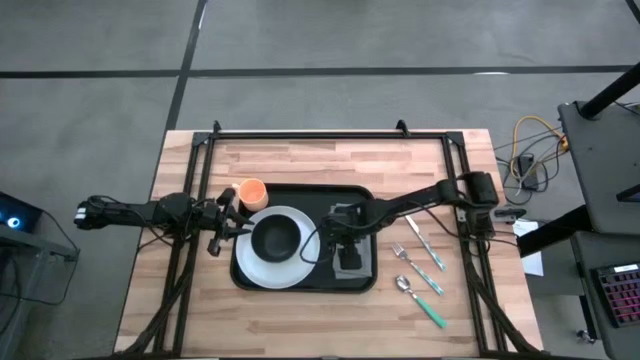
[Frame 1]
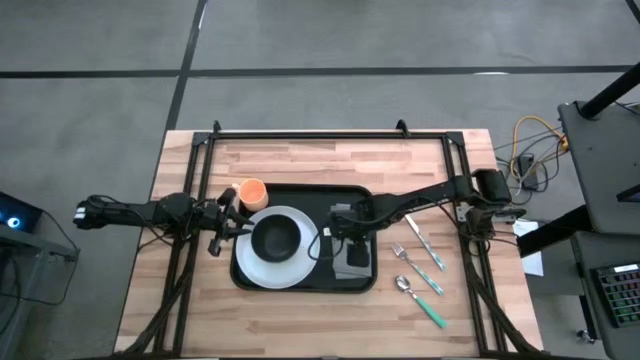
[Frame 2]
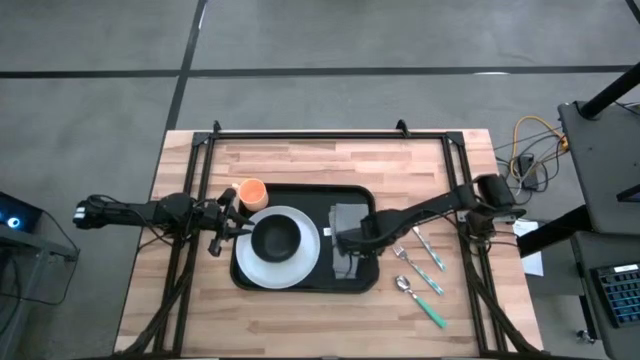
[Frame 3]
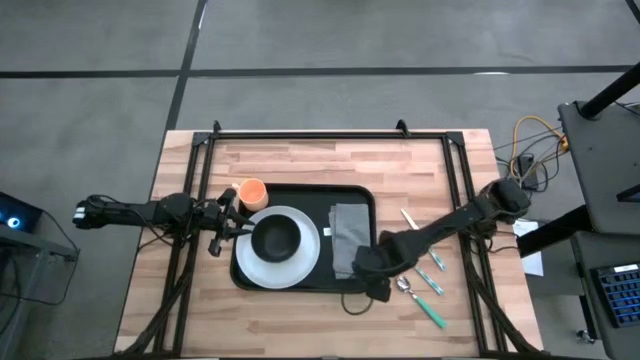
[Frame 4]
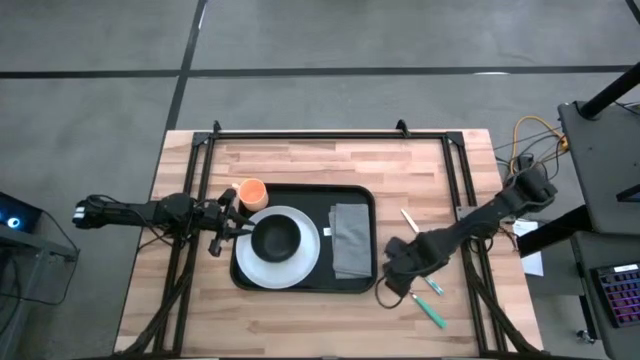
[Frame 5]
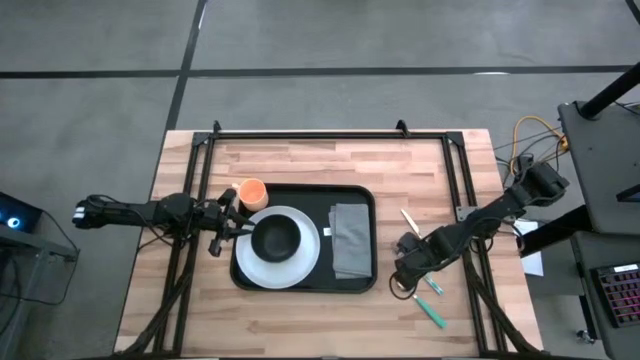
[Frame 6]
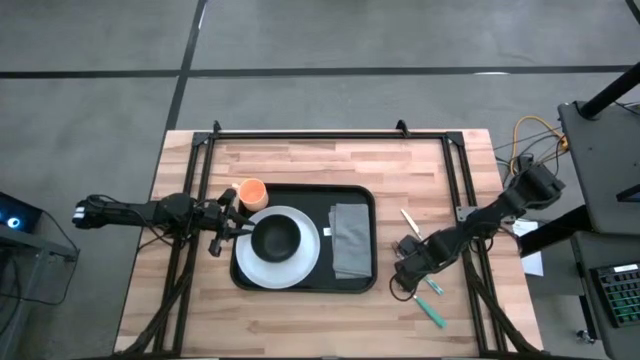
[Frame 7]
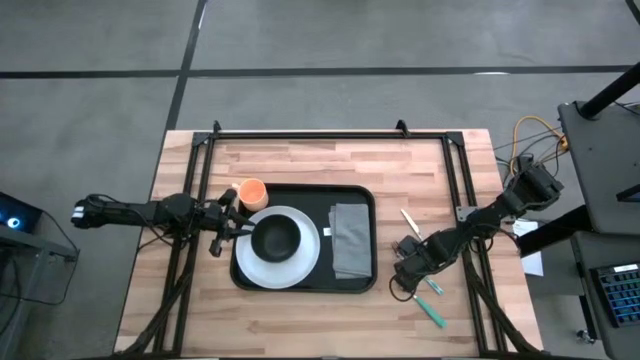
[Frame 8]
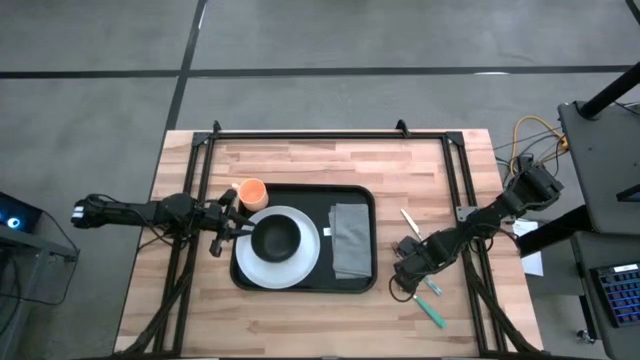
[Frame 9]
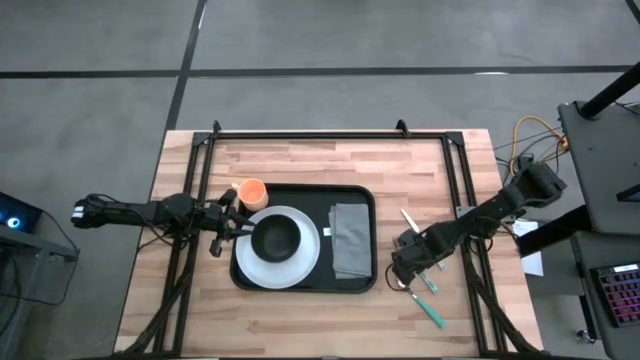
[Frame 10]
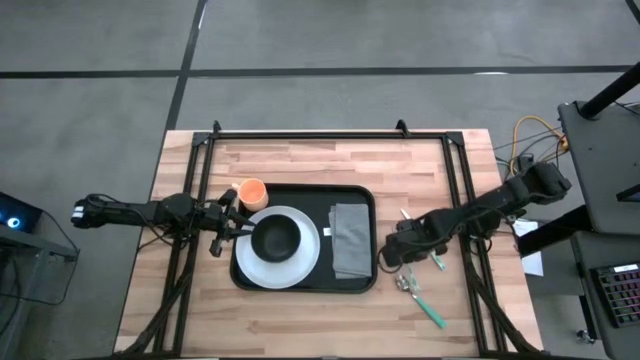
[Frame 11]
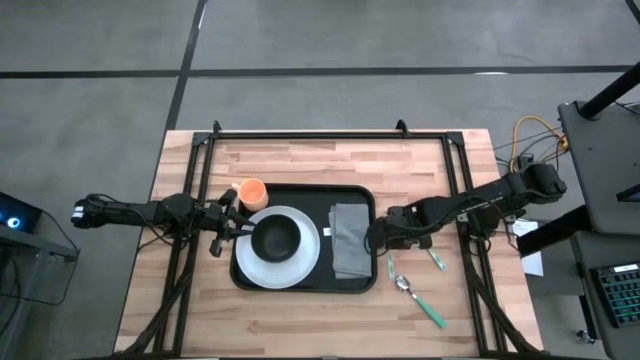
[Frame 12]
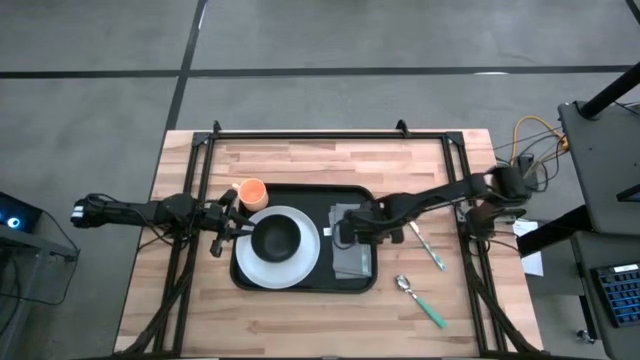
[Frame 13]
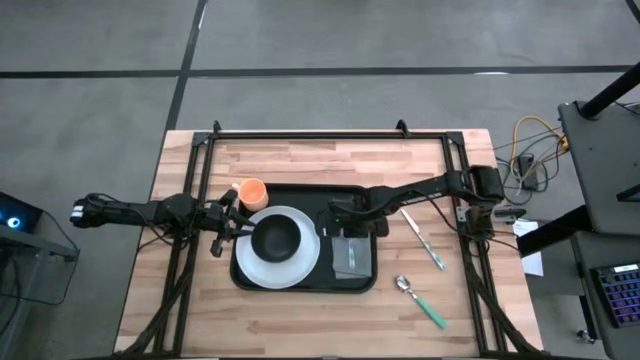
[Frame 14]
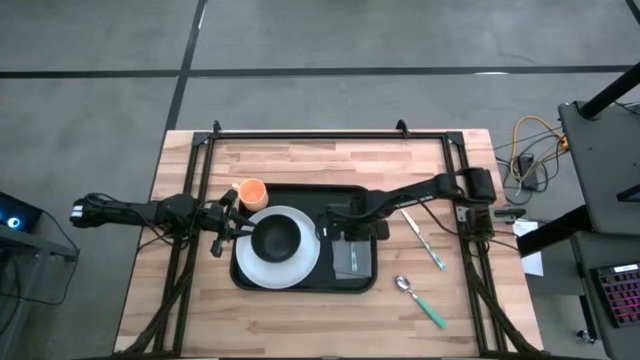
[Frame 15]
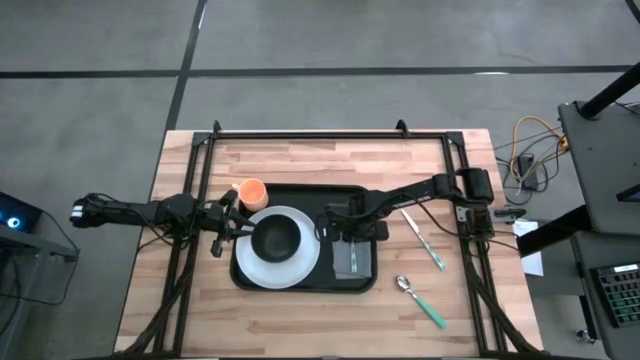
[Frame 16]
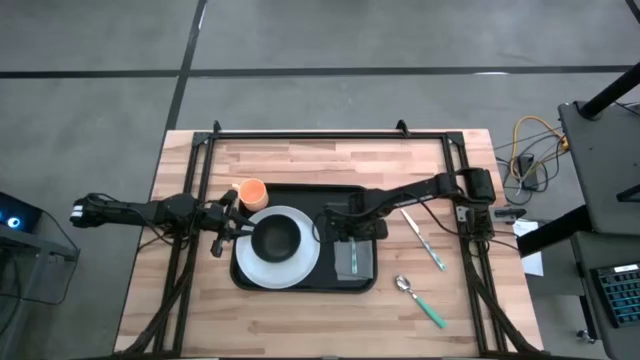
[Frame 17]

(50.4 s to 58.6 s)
Task: Set up tray
Put the white patterned fork on top of the gray napkin

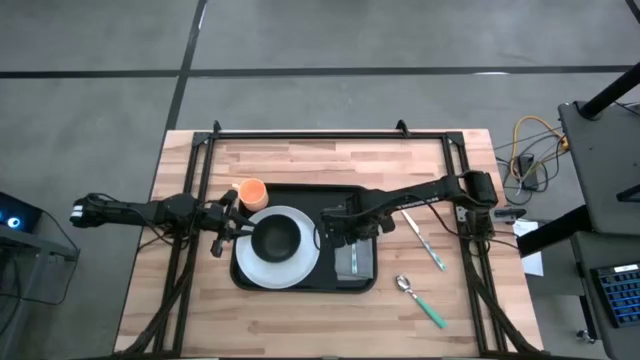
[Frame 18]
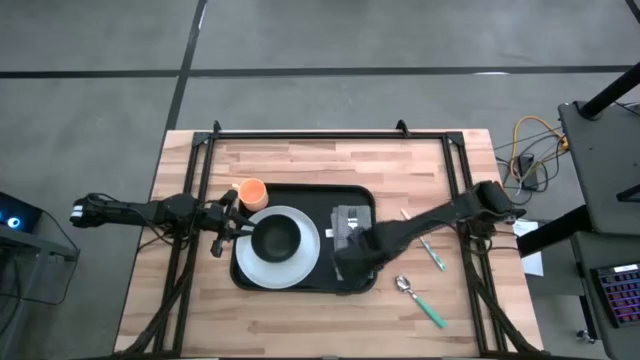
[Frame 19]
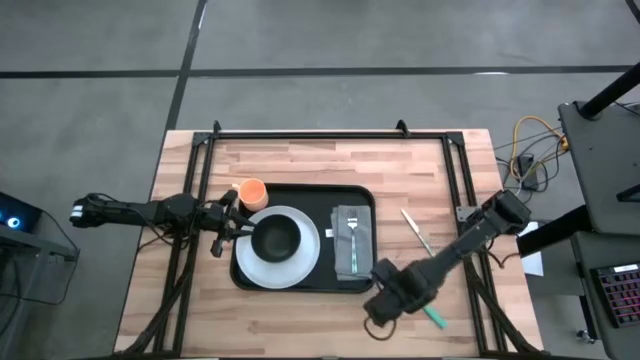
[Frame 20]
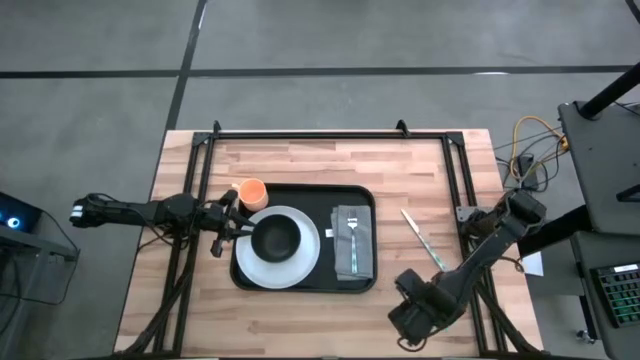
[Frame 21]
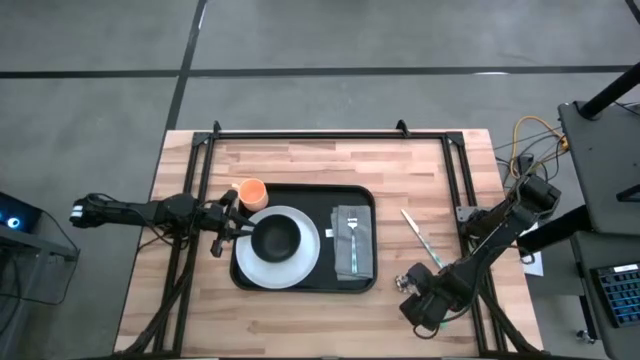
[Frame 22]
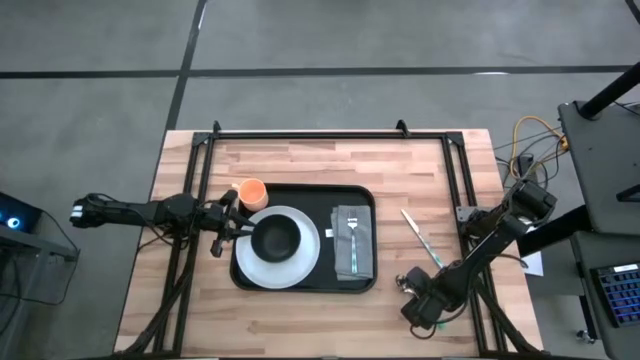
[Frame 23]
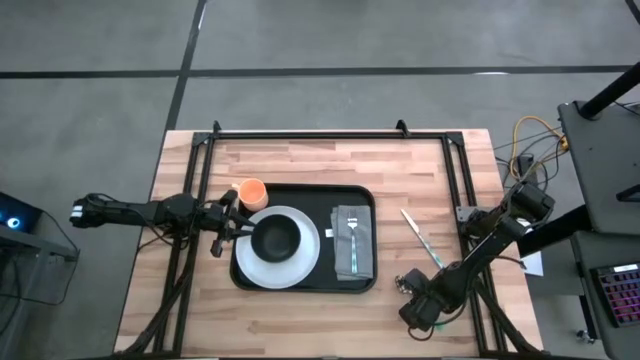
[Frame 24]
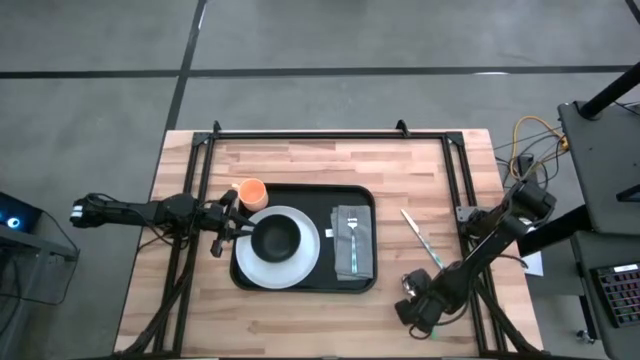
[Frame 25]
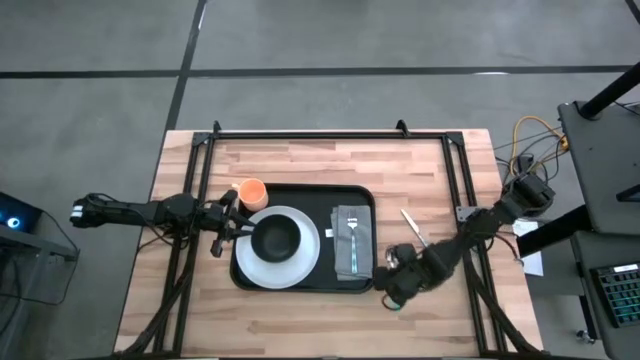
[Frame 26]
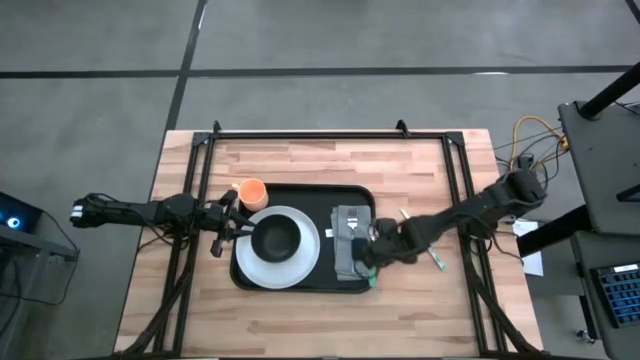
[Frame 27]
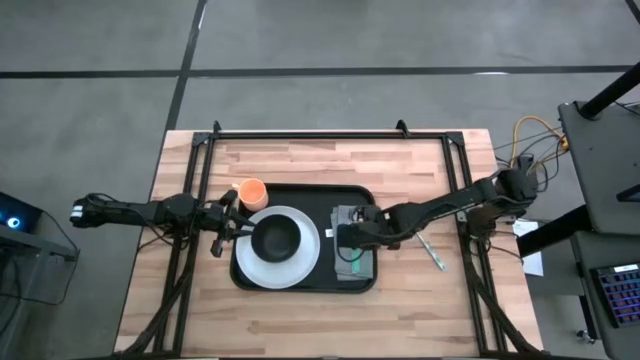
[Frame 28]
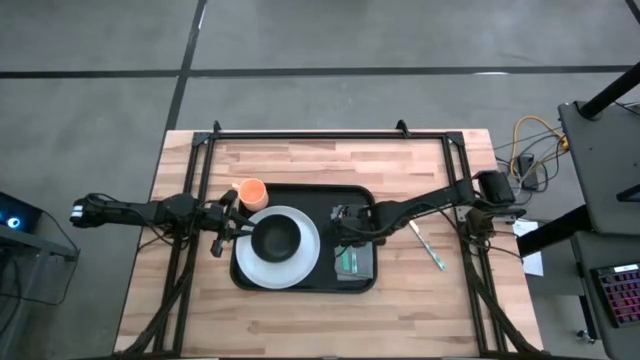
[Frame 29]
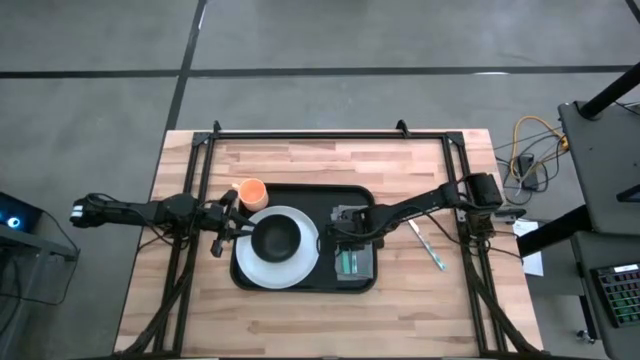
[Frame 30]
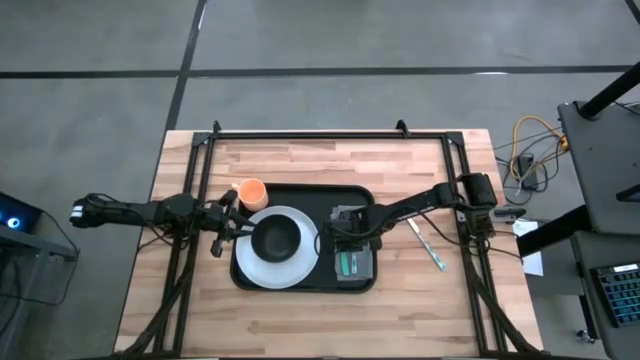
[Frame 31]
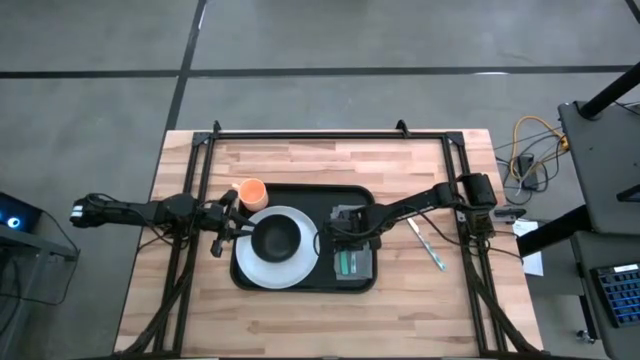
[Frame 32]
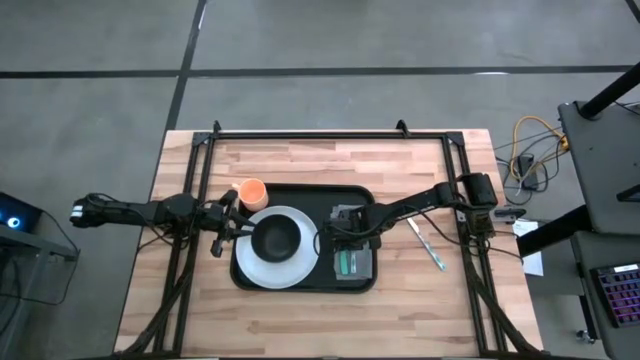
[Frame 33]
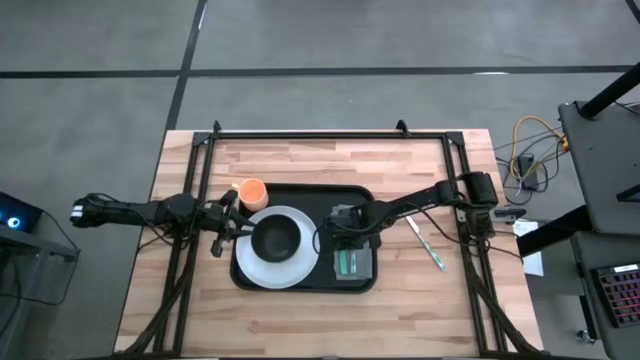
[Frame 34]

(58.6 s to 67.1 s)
Put the light blue patterned spoon on top of the gray napkin

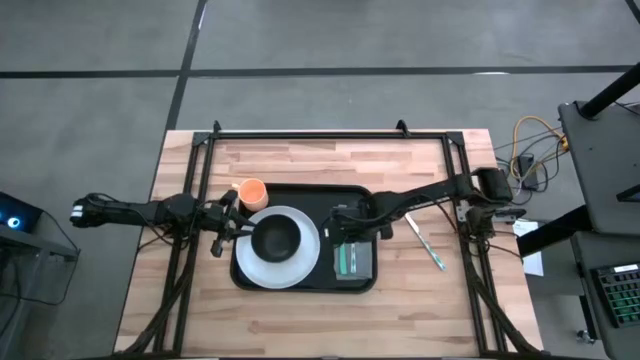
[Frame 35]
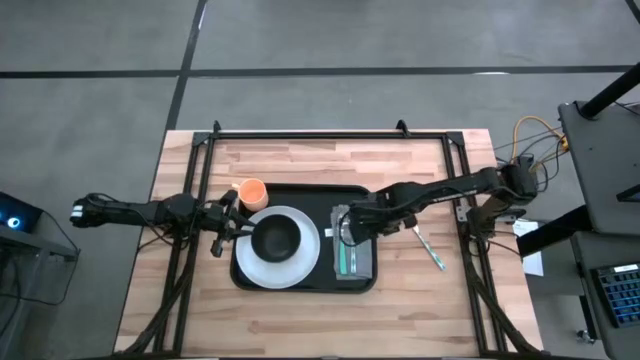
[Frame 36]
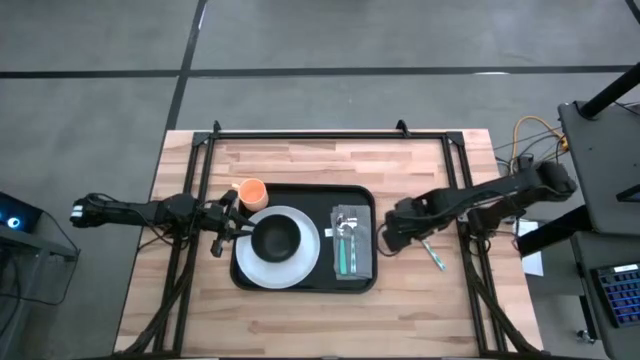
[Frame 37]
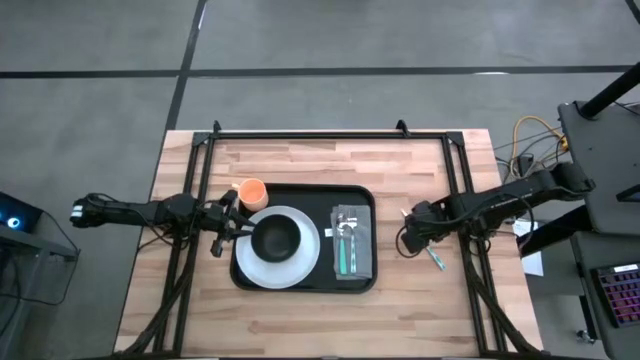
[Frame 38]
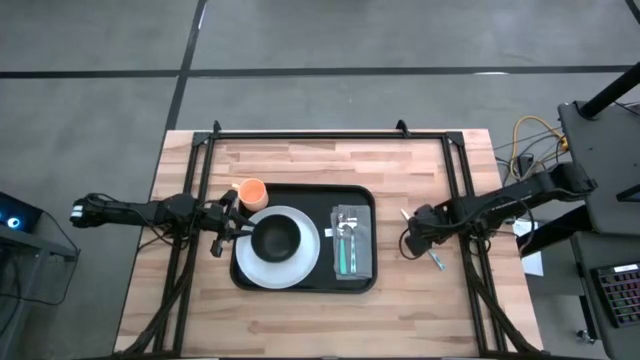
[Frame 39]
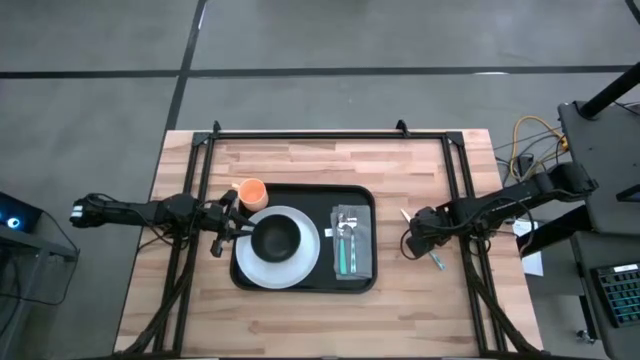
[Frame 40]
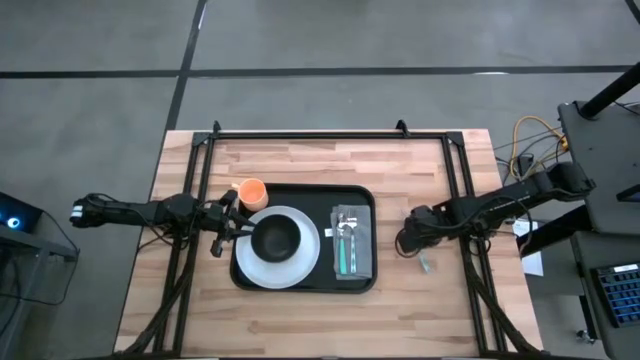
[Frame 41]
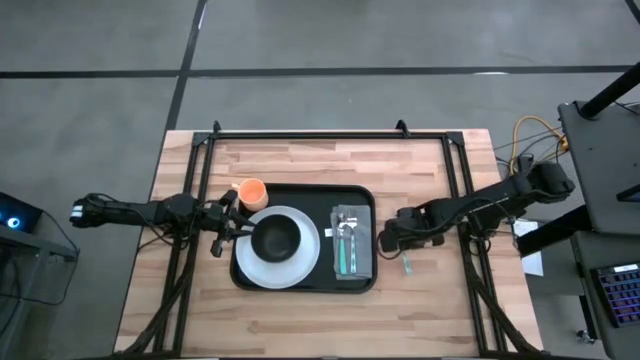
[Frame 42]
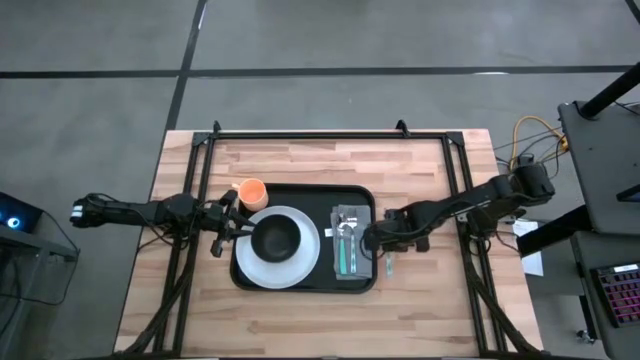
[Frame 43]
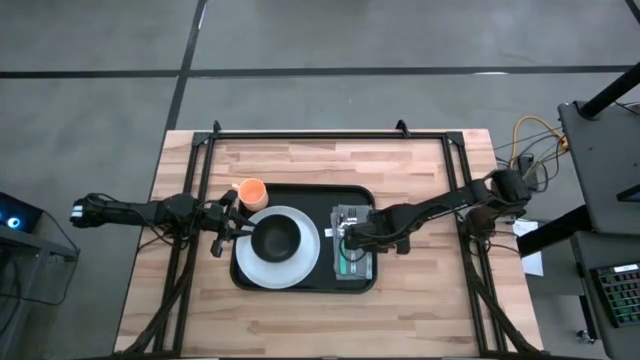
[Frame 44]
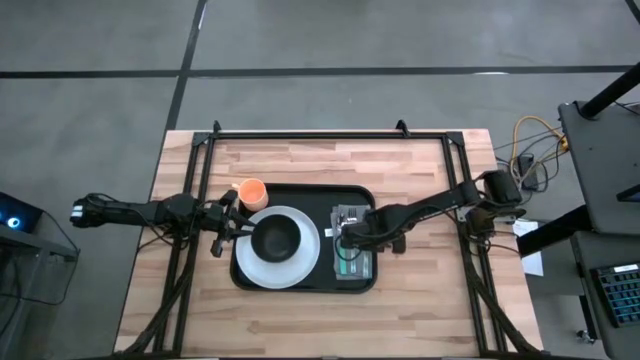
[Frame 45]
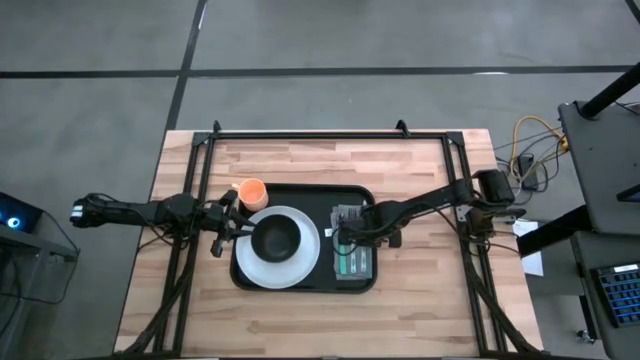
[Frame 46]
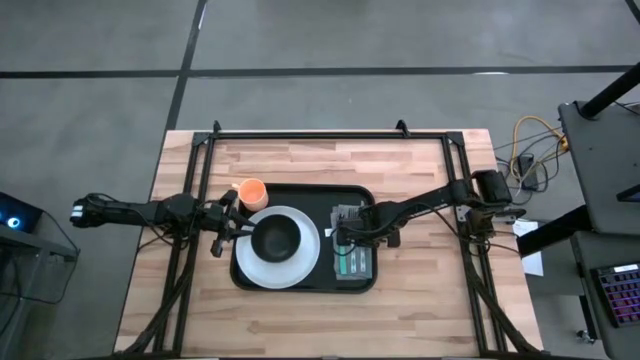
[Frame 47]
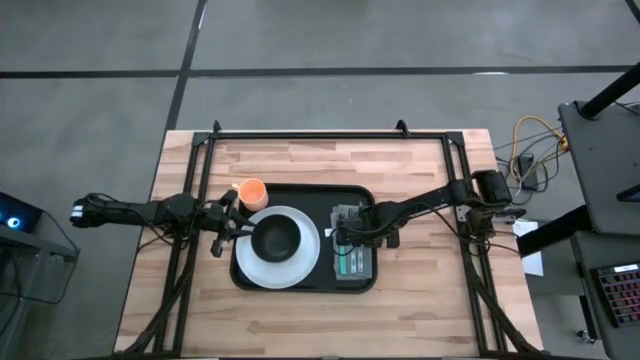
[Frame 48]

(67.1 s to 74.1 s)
Put the white patterned knife on top of the gray napkin
